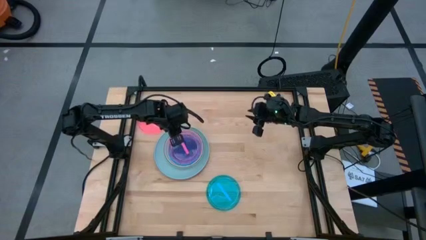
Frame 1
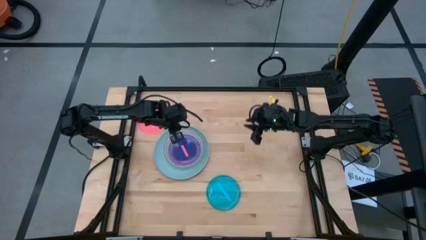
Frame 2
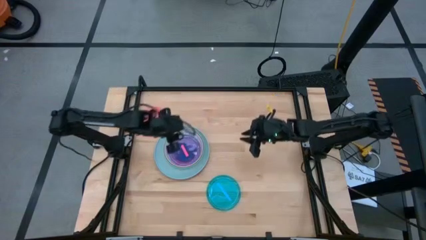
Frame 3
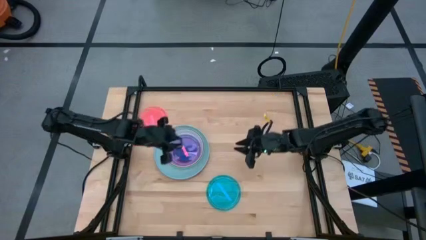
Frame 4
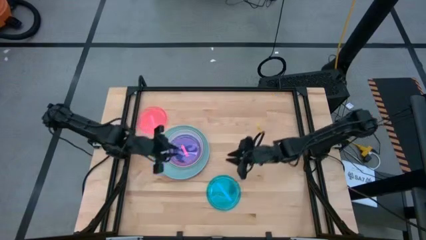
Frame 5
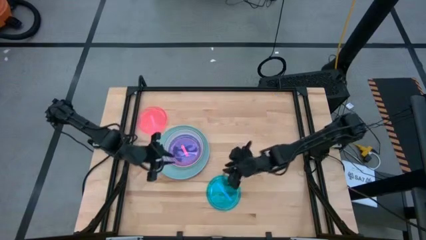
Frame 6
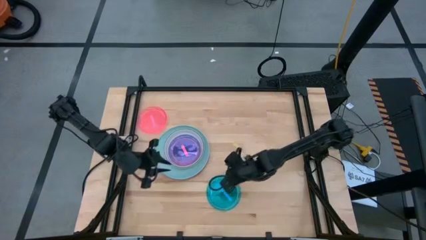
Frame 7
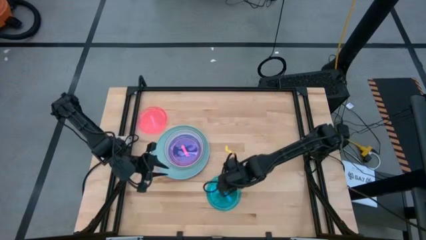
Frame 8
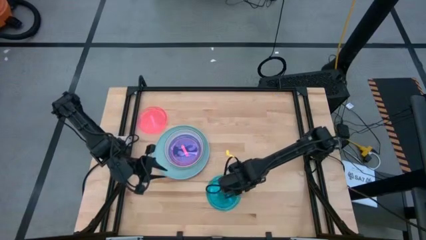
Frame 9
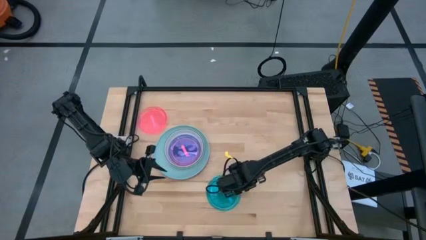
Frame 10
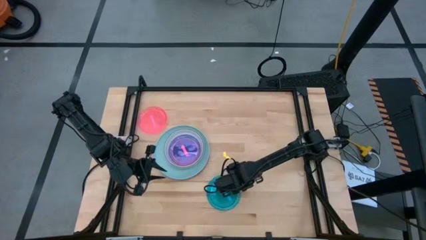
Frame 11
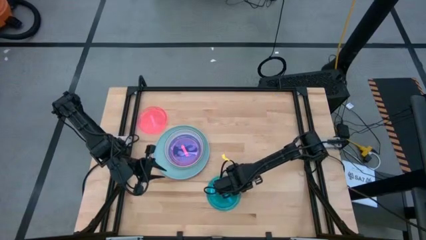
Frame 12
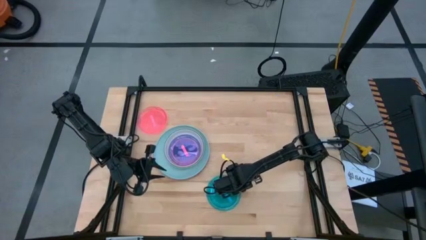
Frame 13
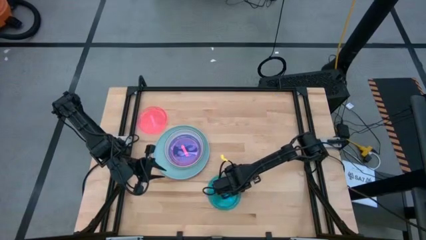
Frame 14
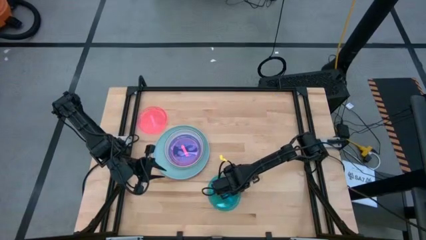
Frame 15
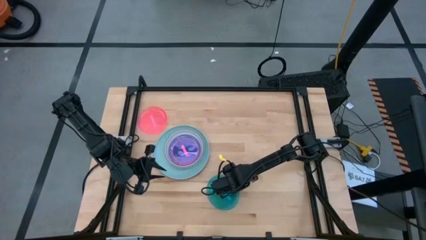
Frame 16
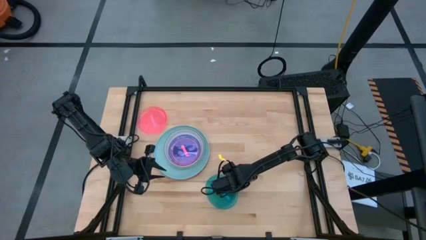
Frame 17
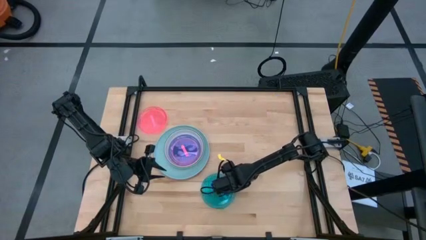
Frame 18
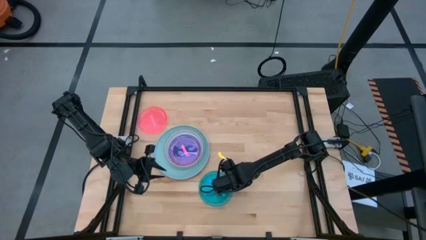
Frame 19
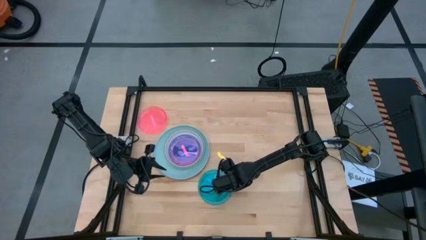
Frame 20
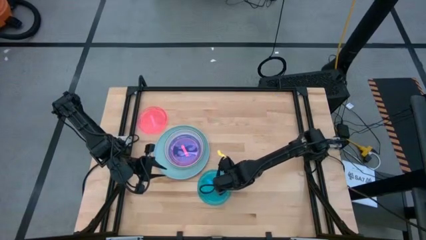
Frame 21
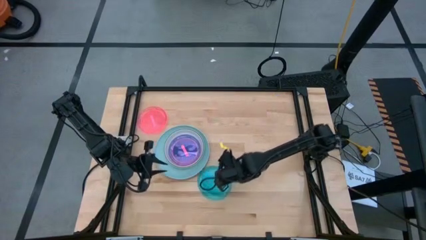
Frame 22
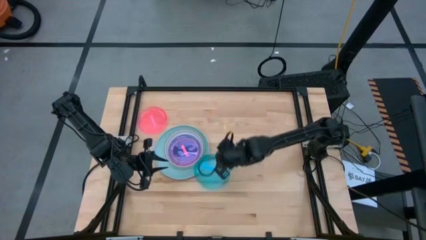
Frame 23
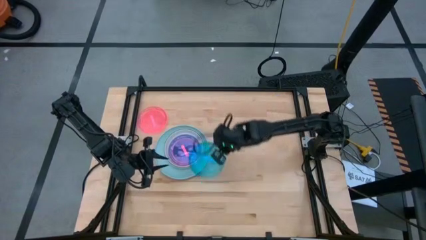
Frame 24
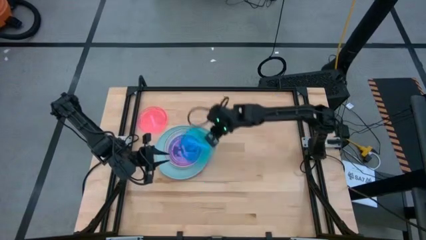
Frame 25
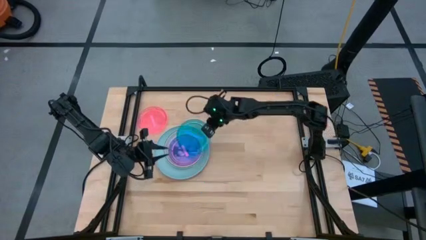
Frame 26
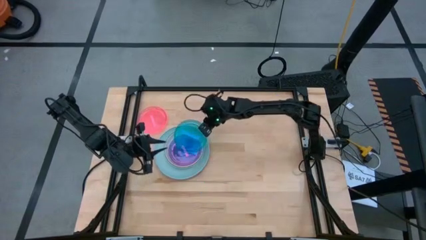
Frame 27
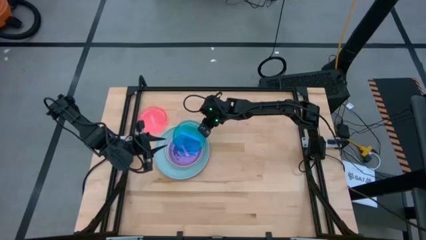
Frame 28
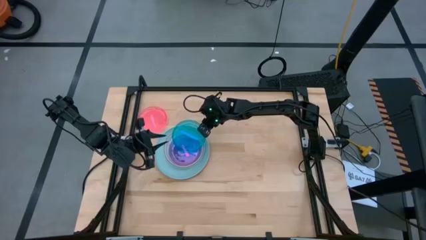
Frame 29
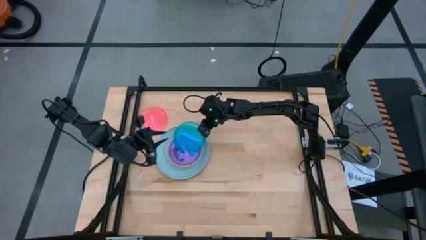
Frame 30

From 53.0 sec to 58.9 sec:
Task: Stack plastic plates
Stack the light blue plate on top of the pink plate

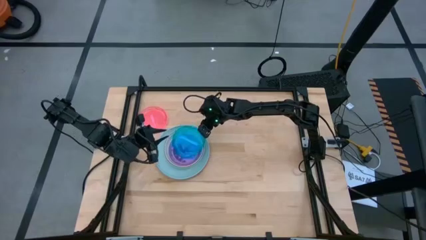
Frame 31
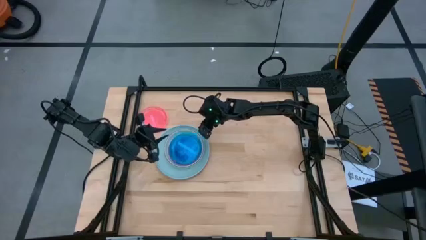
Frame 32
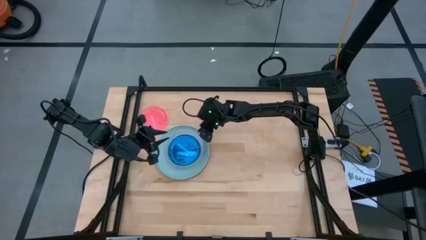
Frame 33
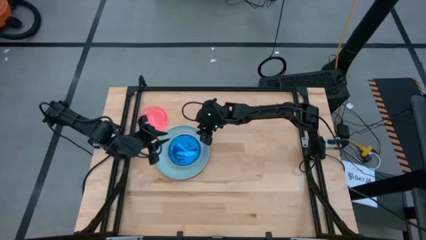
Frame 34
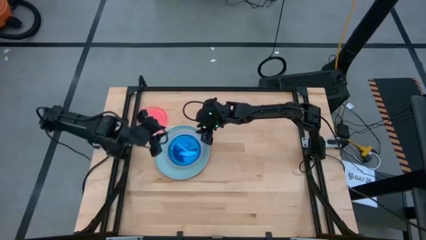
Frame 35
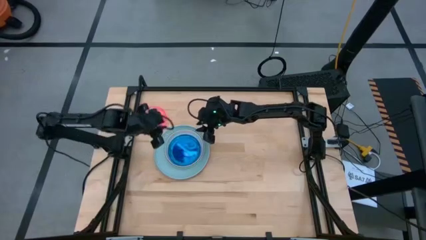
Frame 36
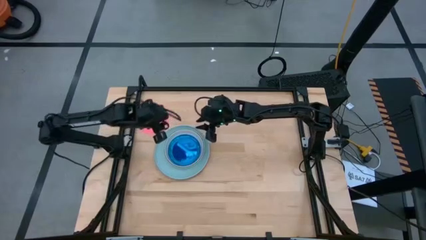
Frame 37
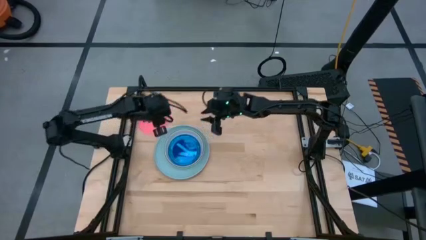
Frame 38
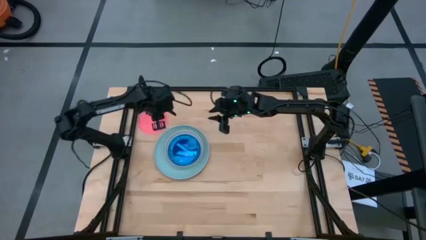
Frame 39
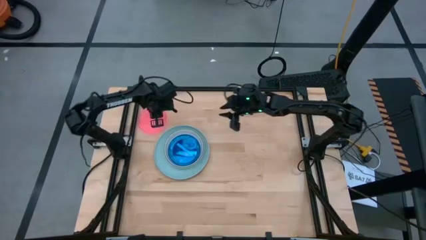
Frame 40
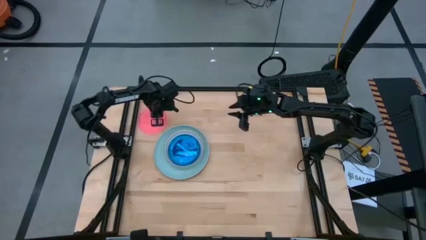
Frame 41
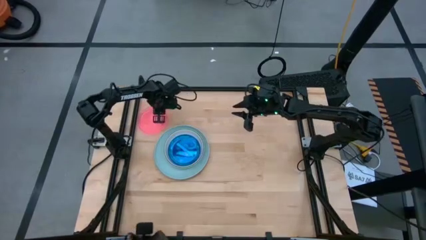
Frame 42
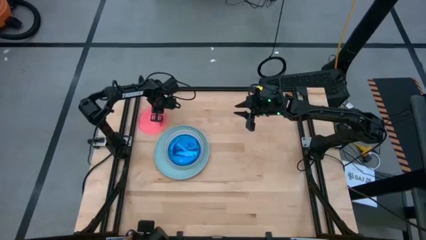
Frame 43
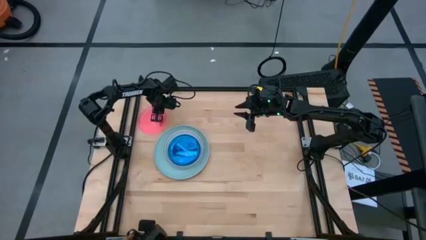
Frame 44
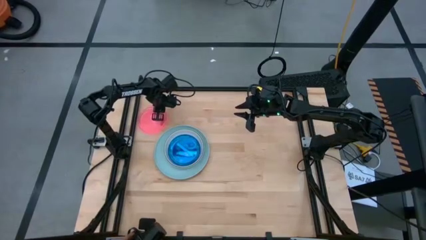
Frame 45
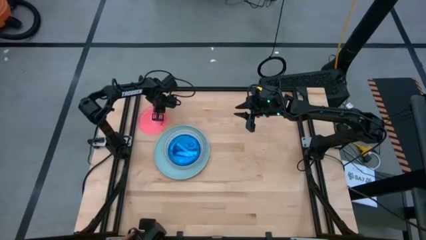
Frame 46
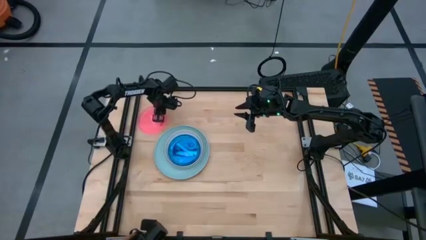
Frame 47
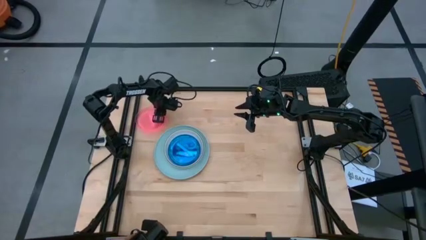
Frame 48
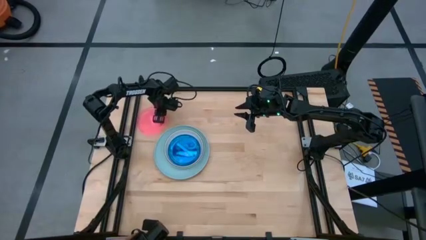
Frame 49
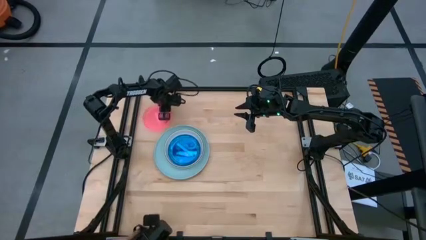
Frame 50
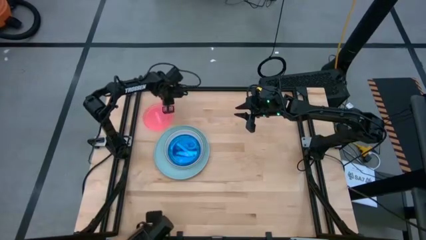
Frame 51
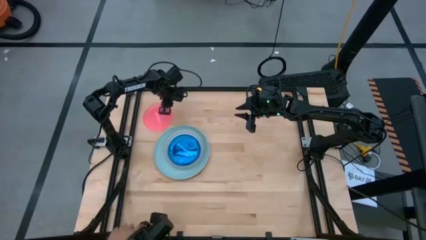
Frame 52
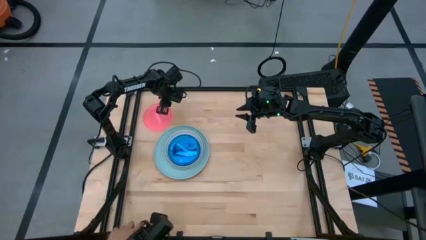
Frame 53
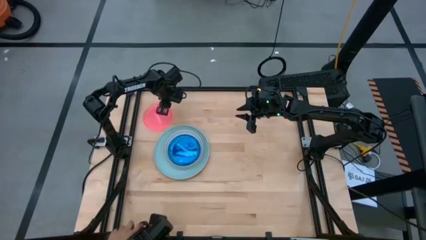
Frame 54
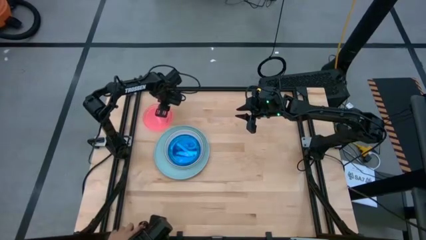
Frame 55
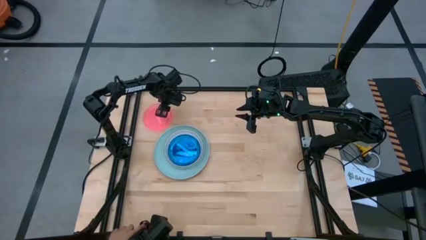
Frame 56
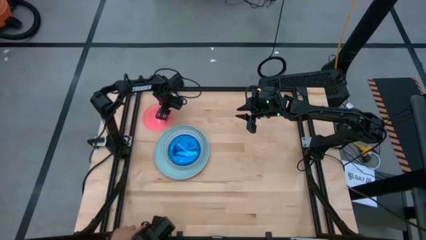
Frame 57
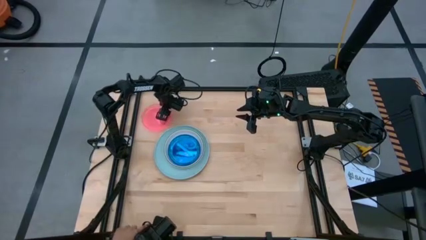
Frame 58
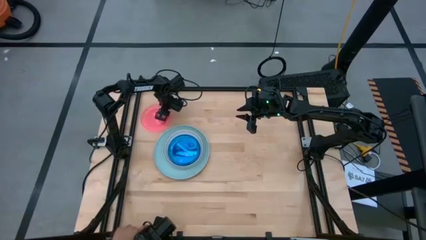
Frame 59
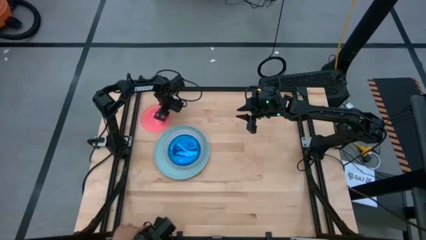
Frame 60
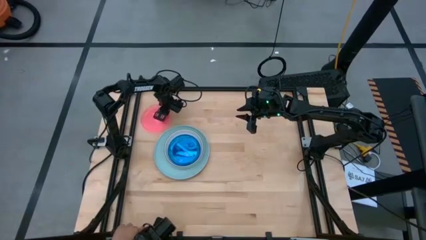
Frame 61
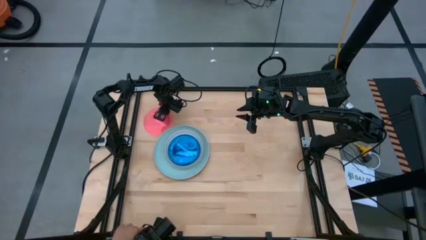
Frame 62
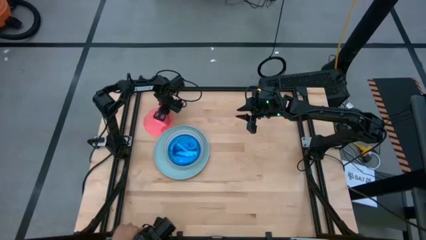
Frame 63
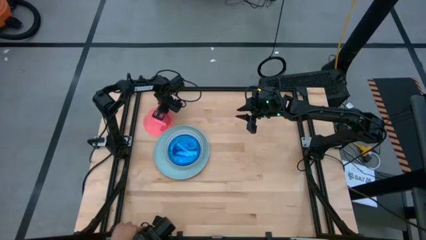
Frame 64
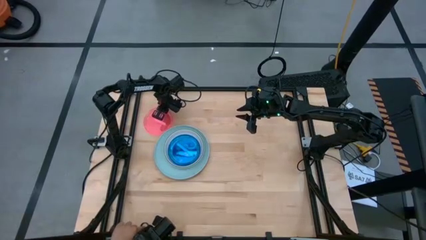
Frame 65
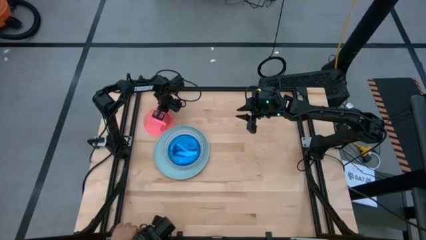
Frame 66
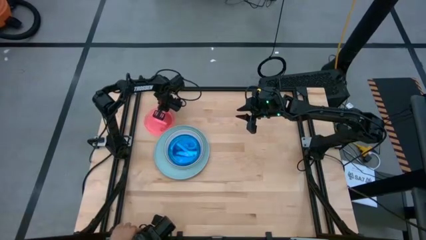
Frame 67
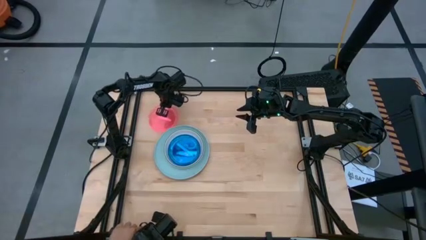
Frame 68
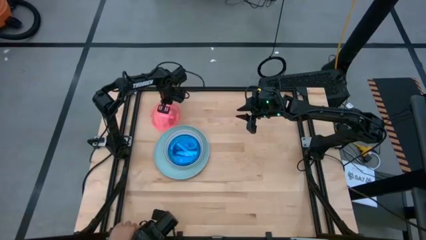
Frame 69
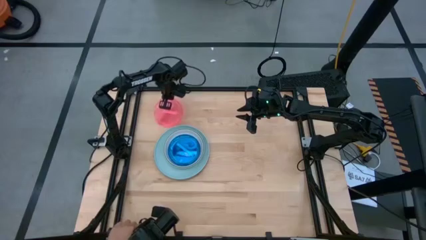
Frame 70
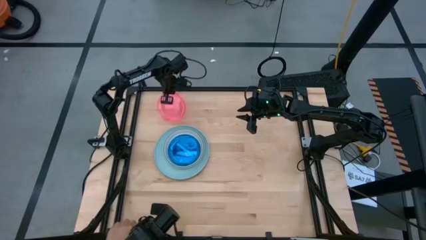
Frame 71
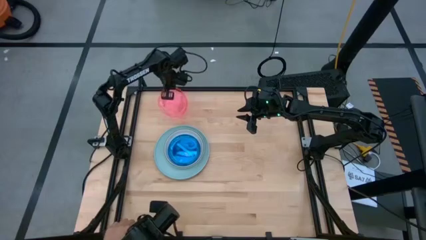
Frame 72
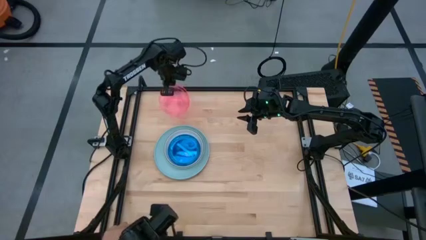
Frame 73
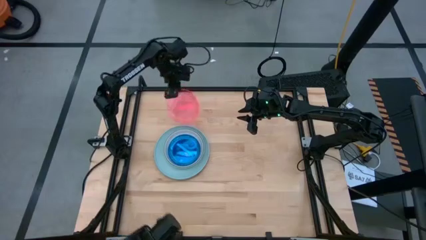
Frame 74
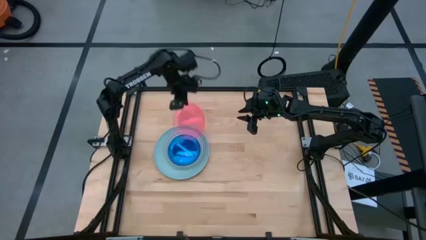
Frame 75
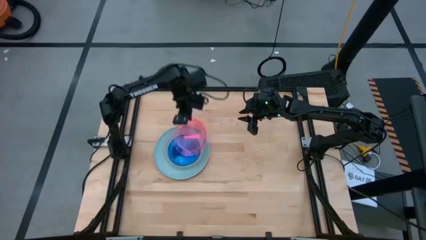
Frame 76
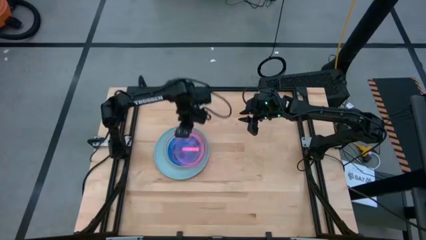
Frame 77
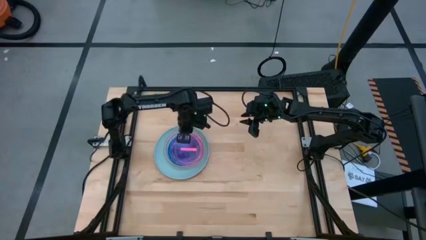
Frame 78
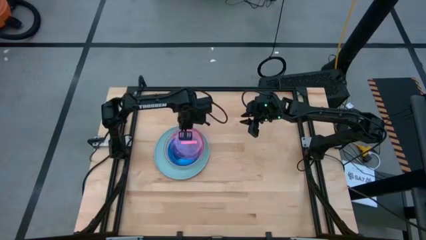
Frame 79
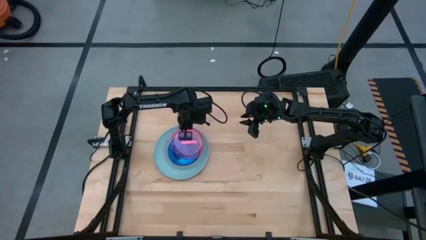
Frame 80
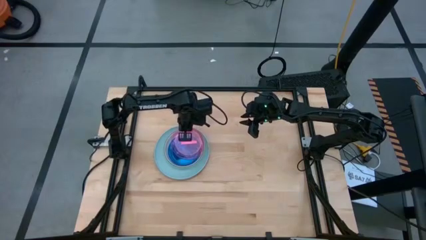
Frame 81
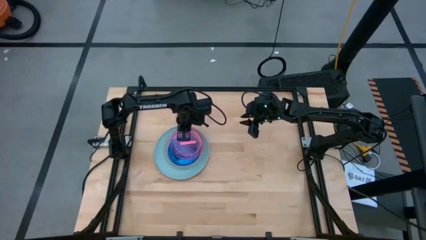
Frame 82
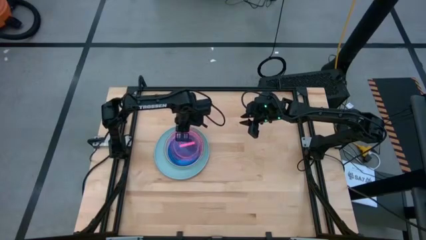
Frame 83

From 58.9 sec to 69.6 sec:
Stack the pink plate on top of the light blue plate
